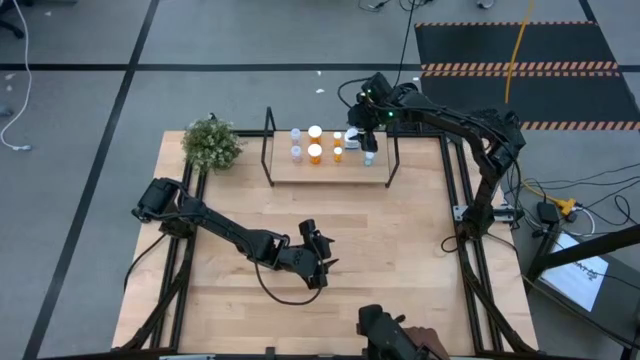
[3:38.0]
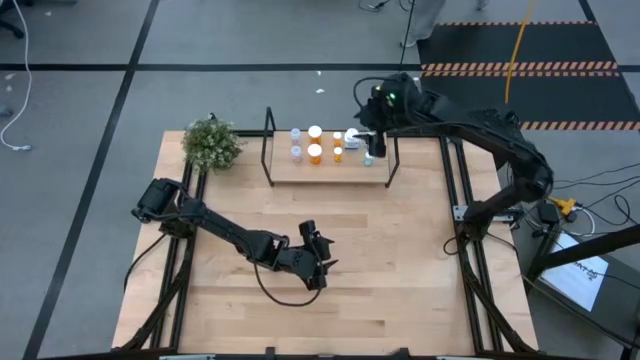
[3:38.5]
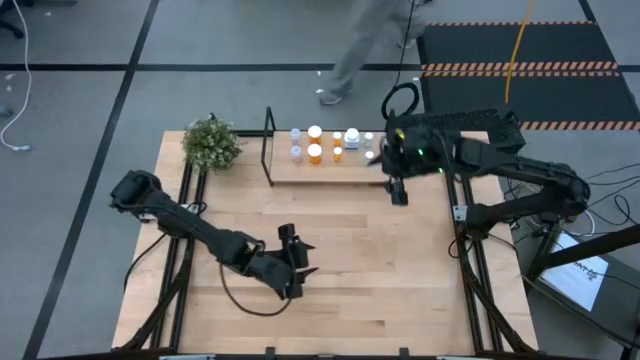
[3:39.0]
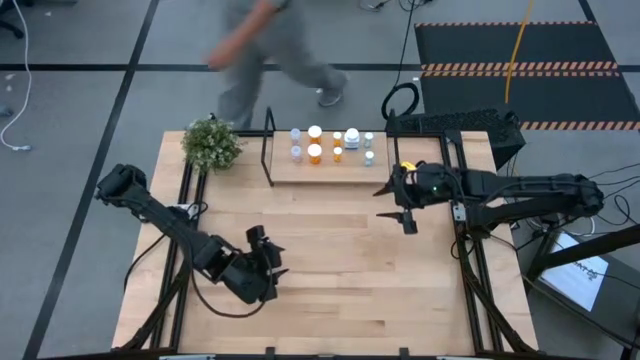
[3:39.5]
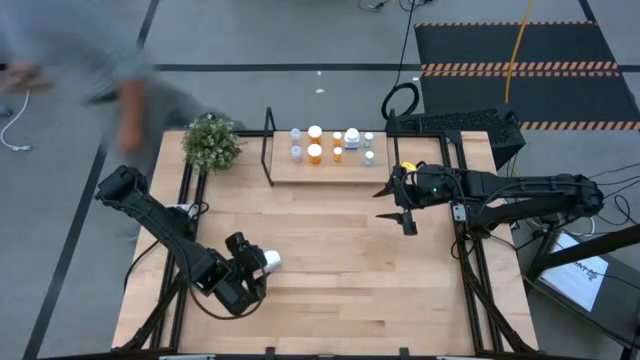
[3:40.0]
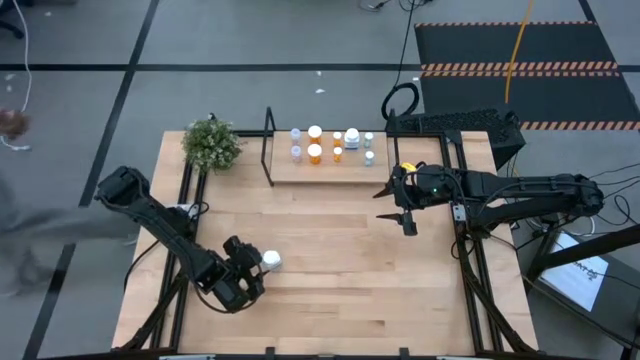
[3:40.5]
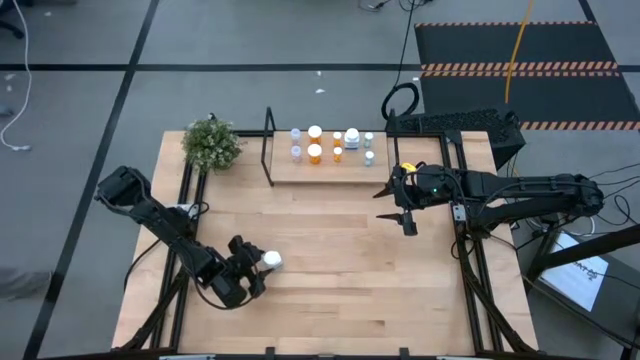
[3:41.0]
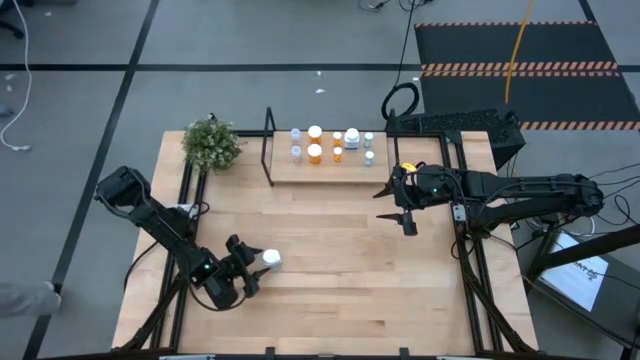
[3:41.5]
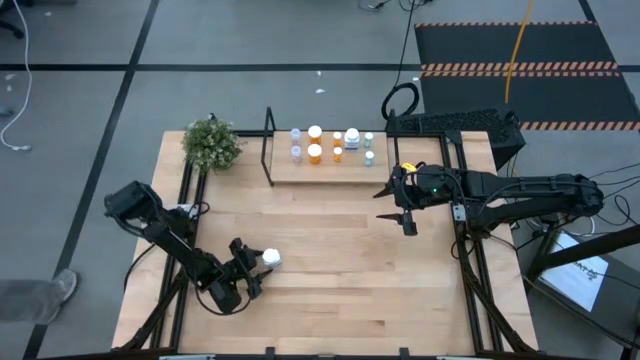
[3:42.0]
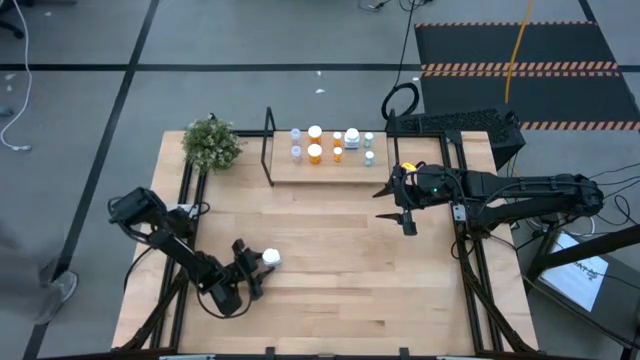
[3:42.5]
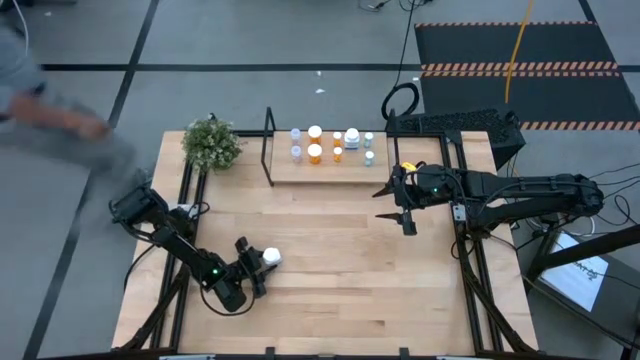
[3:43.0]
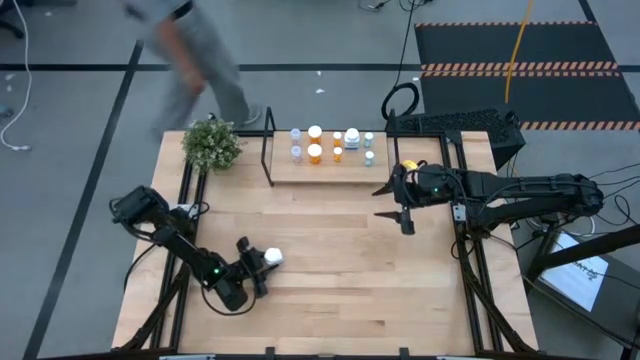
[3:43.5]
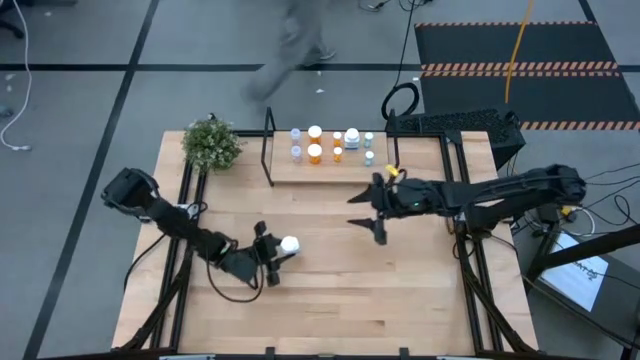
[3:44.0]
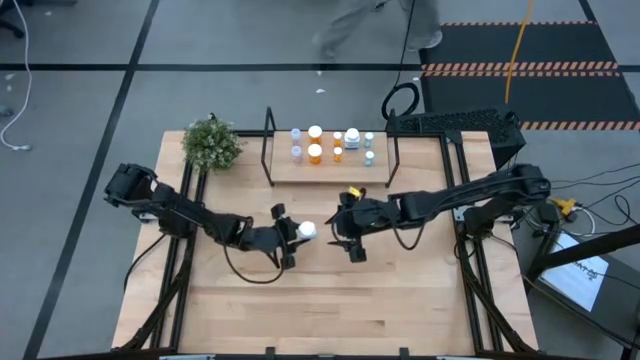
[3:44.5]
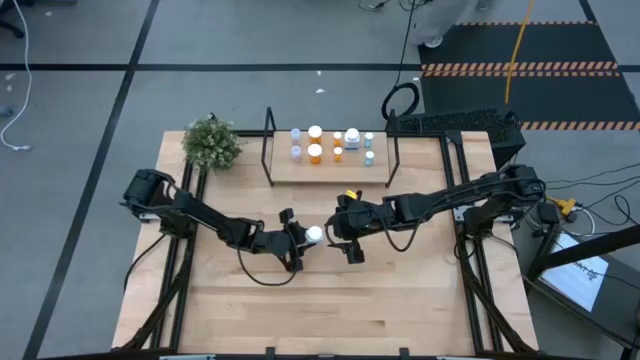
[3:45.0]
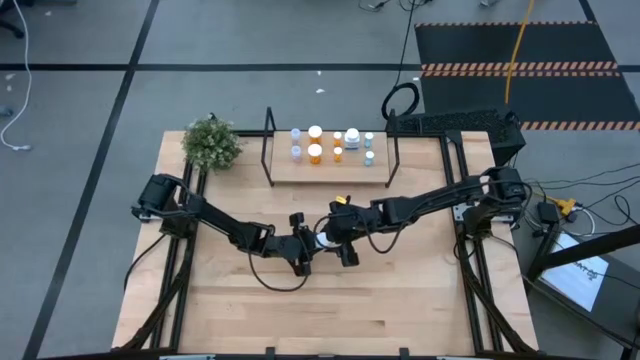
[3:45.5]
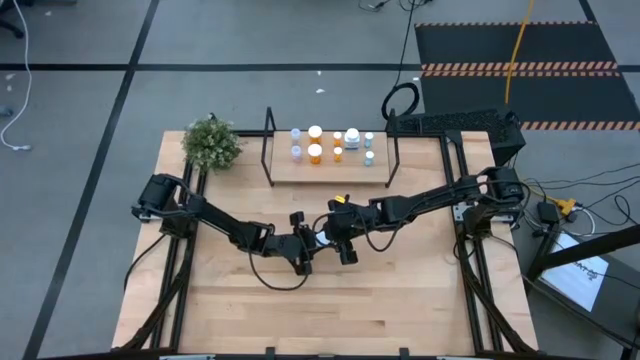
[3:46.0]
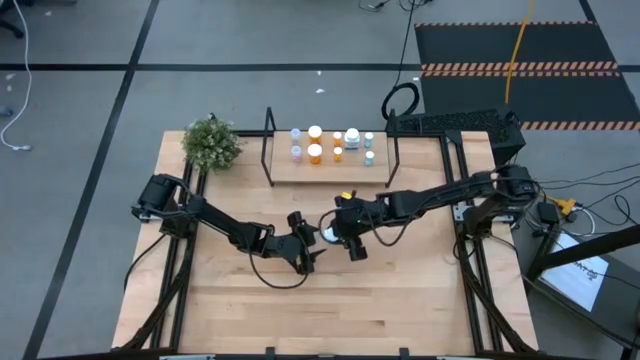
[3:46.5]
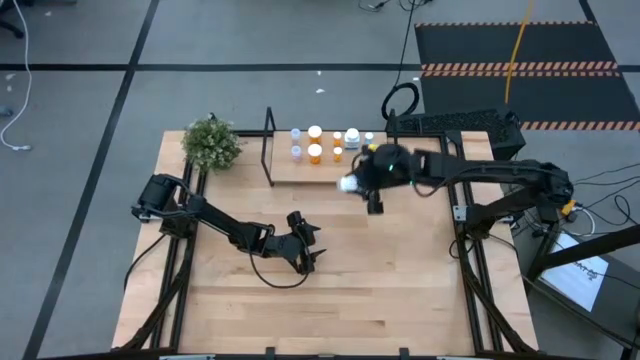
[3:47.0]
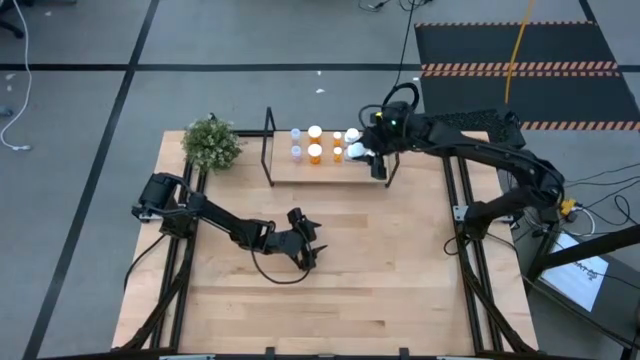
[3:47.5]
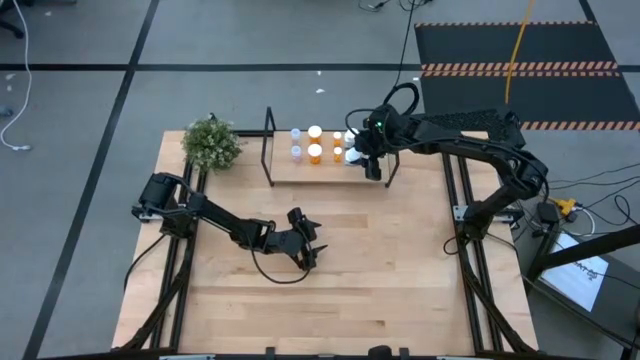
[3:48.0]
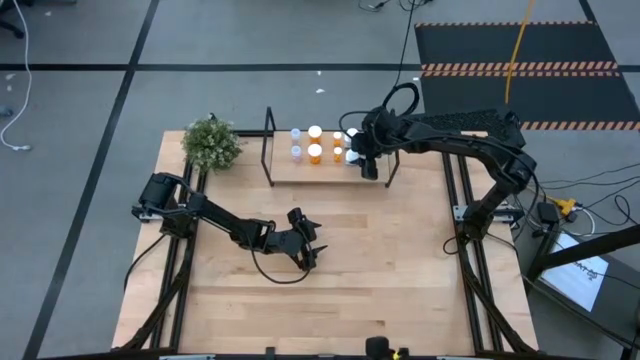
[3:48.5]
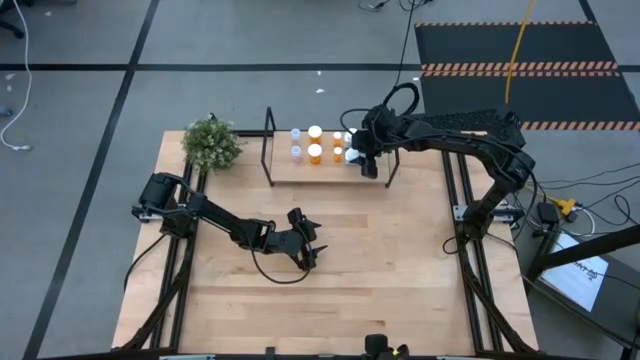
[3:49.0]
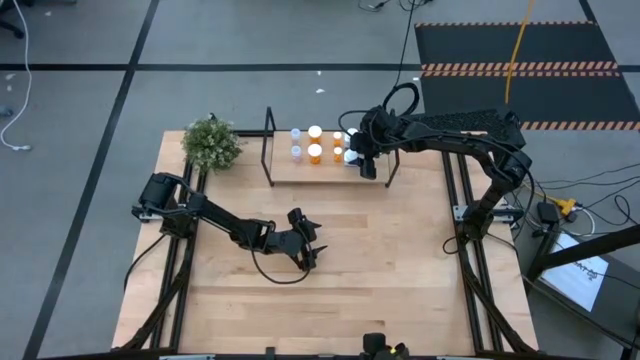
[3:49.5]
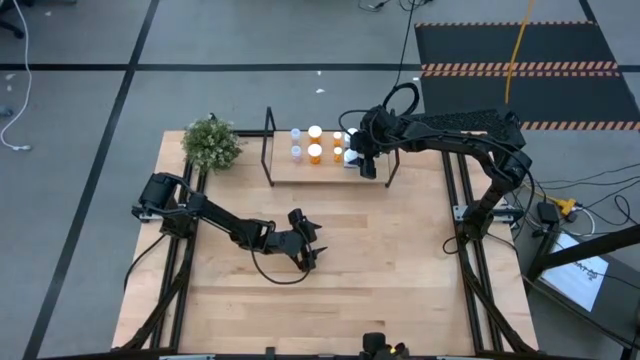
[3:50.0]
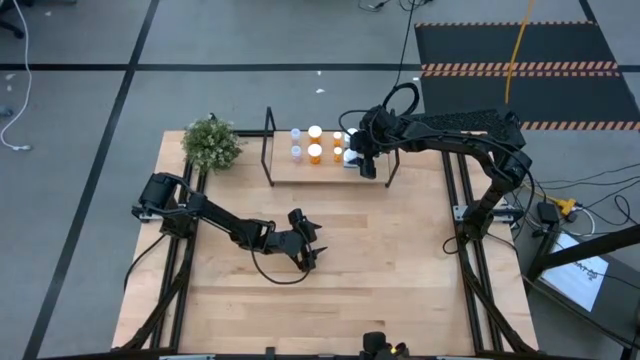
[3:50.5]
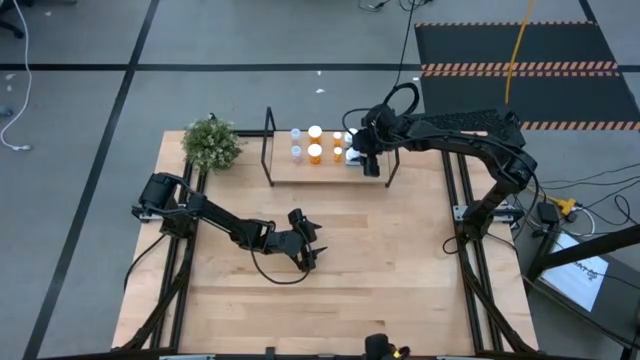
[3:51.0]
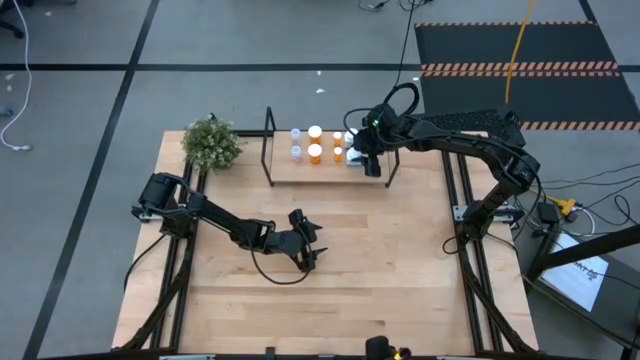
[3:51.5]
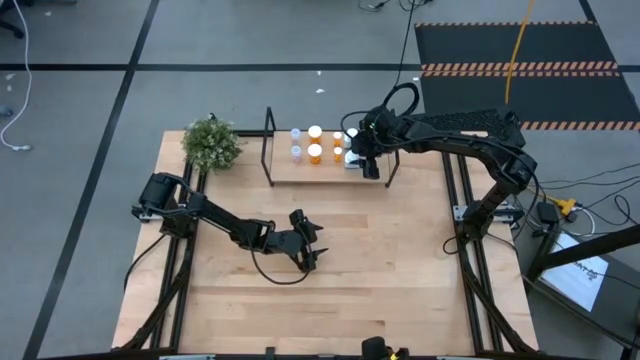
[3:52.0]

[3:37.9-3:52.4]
Task: Pick and place medicine bottles onto shelf by color
Put the white pill bottle on the shelf aligned with the other white pill bottle

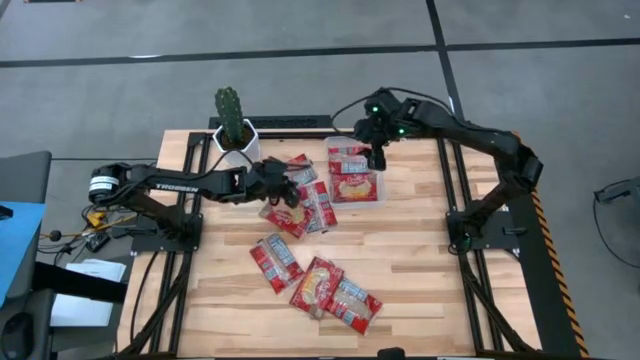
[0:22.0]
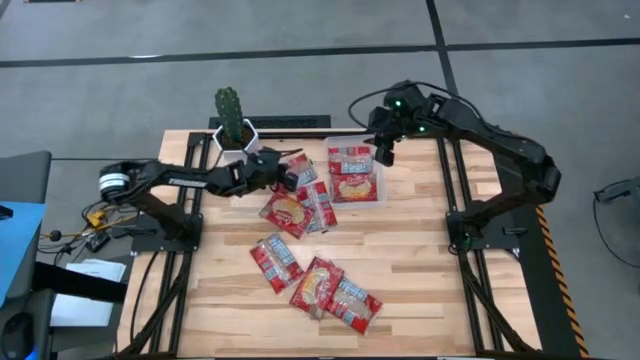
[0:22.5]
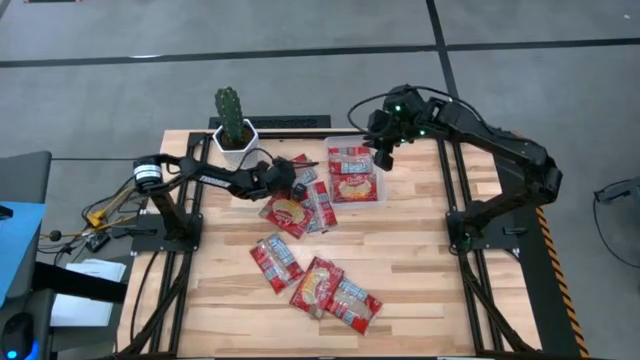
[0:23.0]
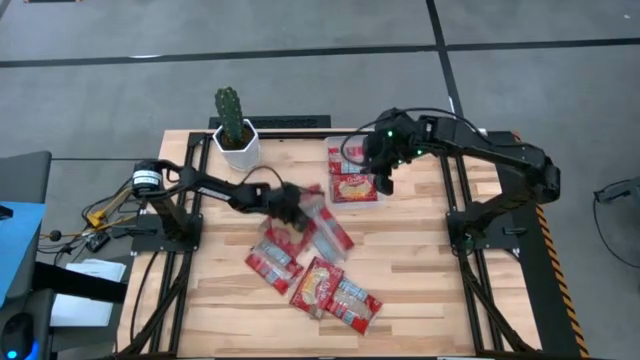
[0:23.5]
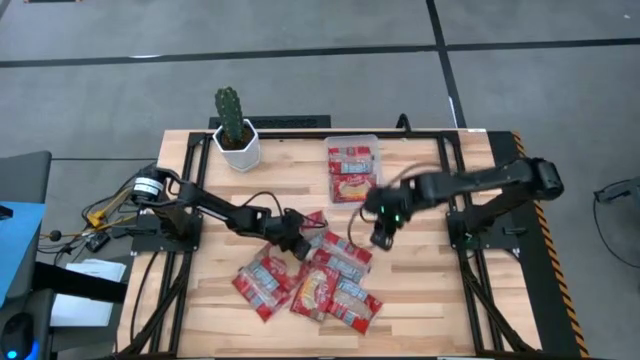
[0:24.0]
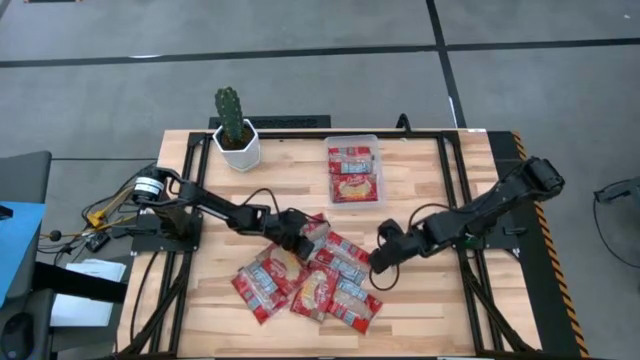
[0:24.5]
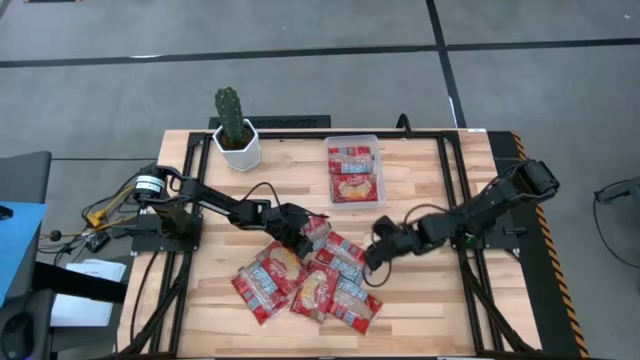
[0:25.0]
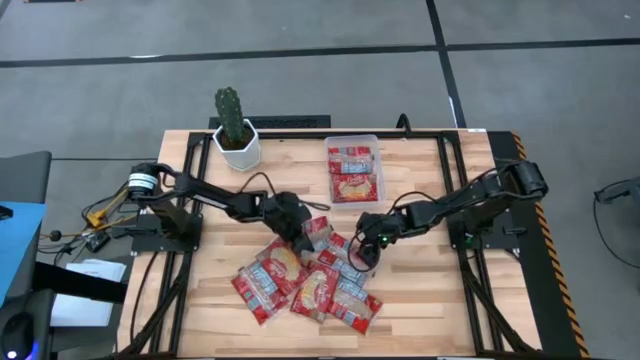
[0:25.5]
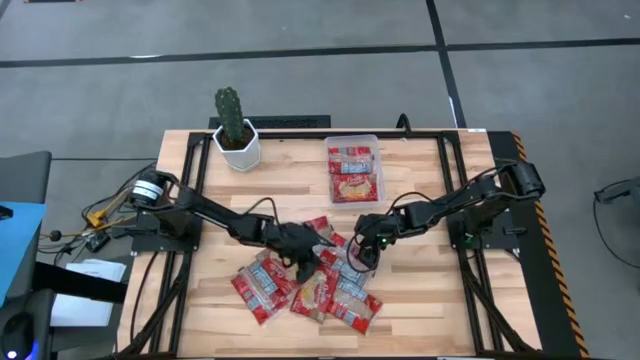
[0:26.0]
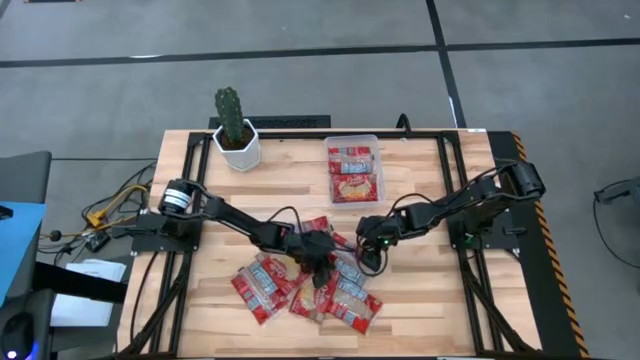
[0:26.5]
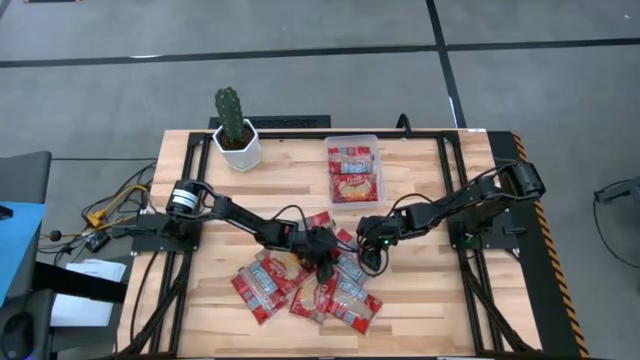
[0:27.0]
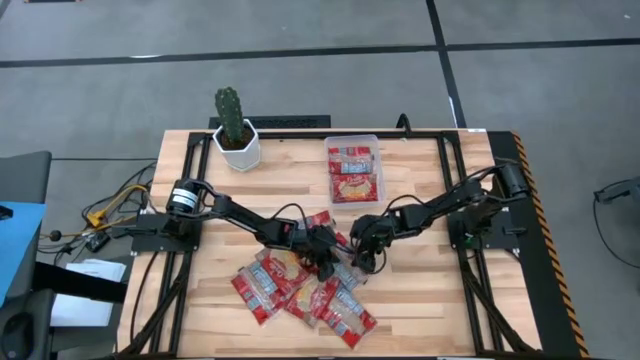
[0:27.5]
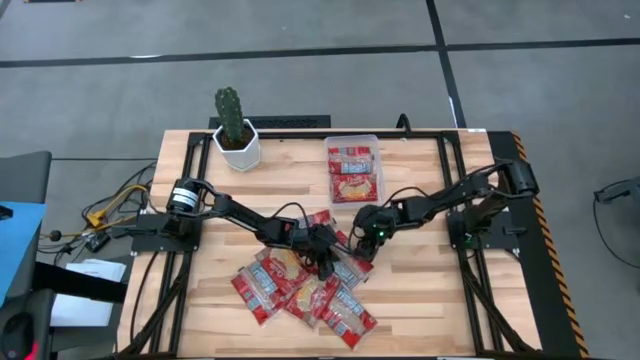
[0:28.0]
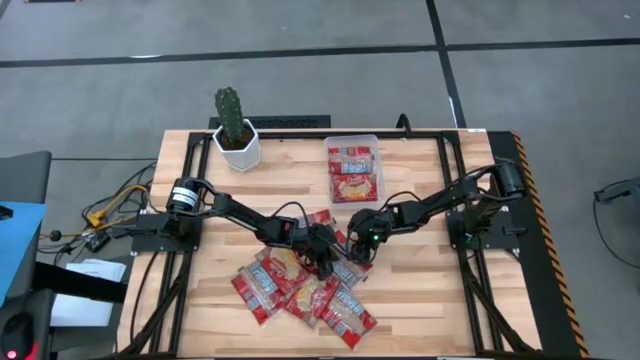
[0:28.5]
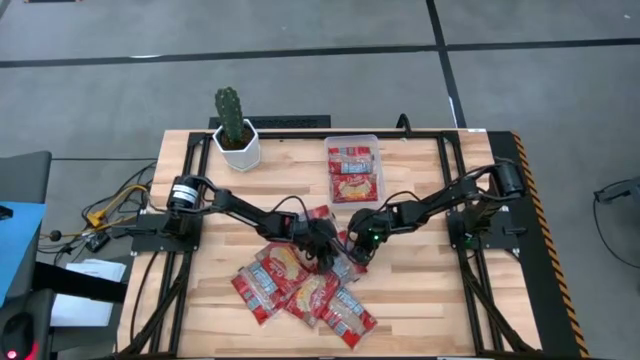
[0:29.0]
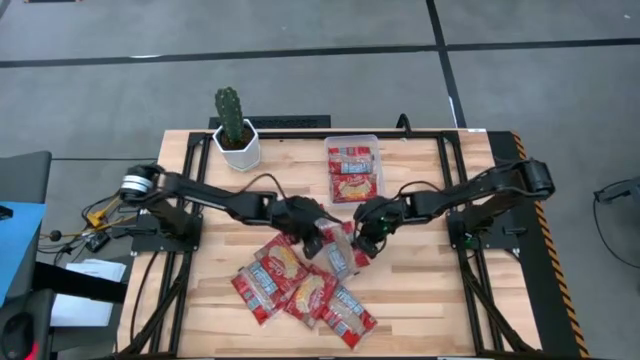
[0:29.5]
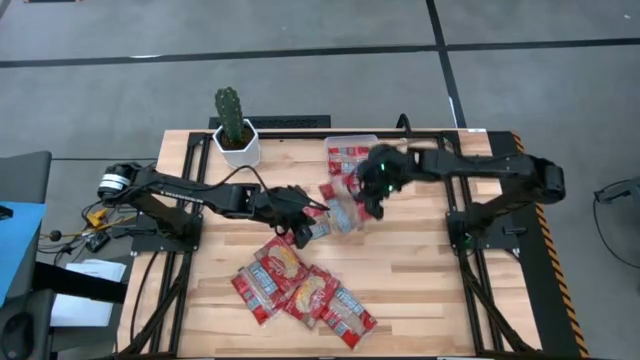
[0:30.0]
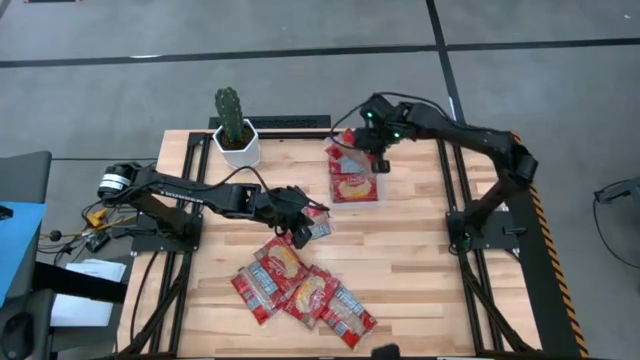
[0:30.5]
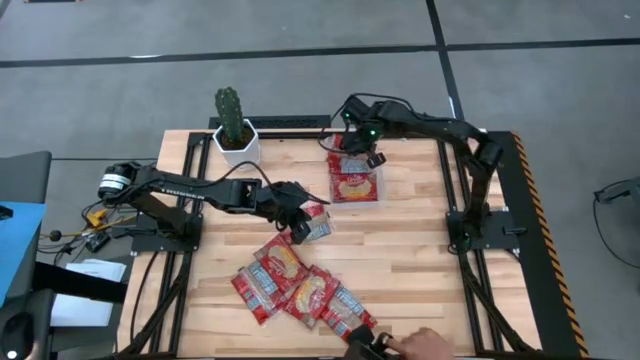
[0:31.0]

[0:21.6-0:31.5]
Task: Sort popcorn bags into baskets
Put the popcorn bag into the transparent bin
